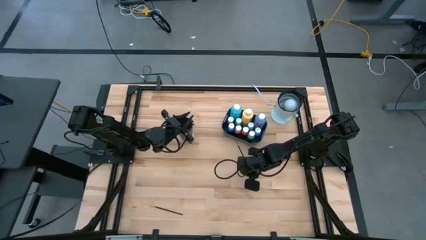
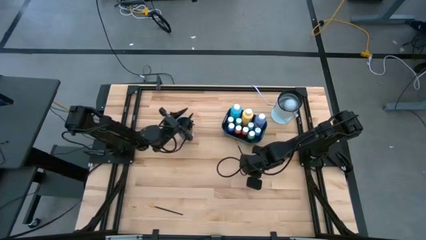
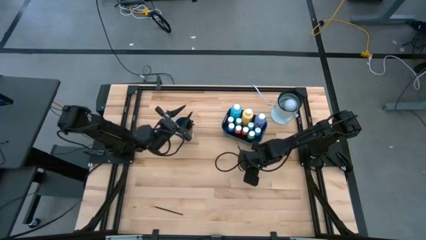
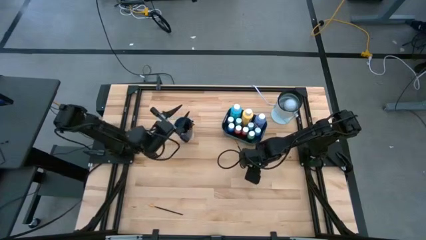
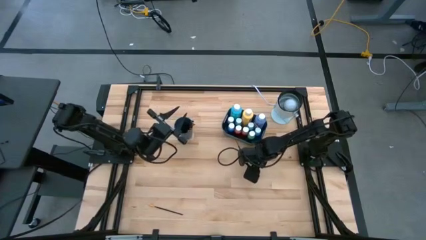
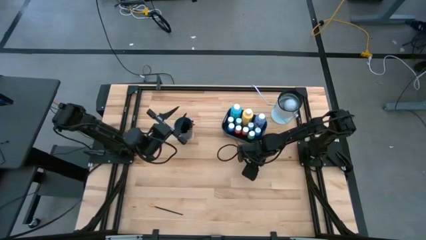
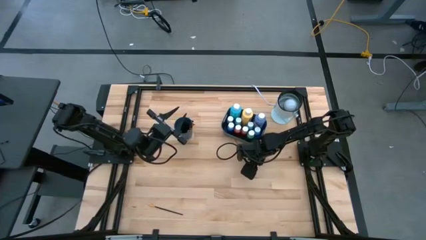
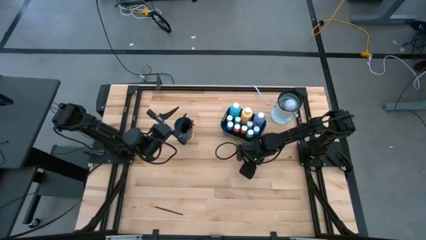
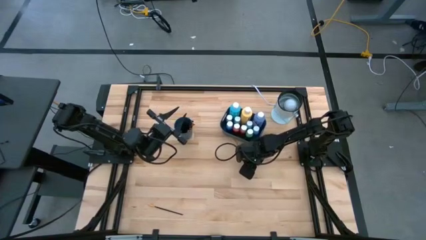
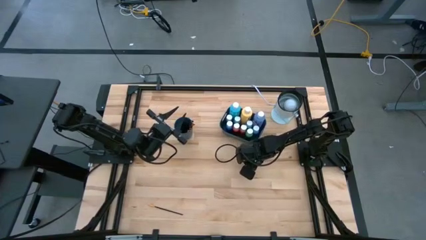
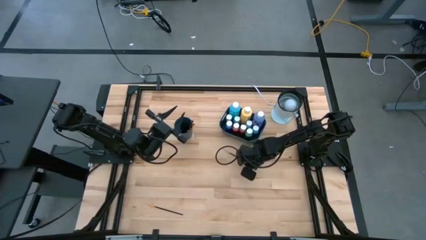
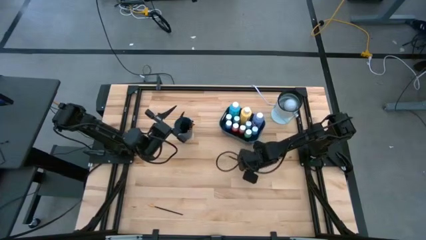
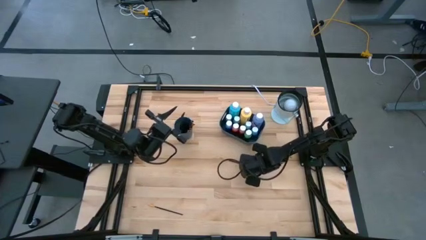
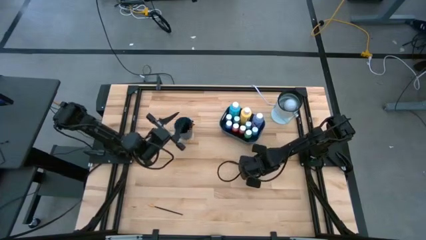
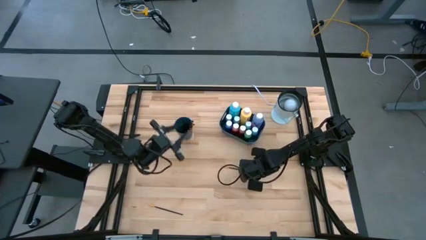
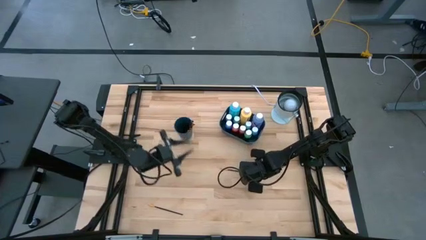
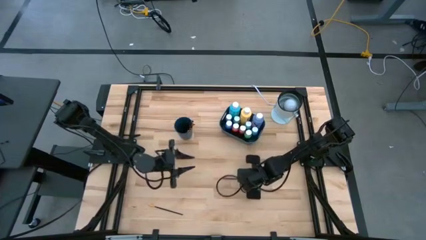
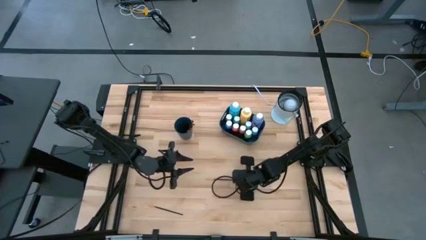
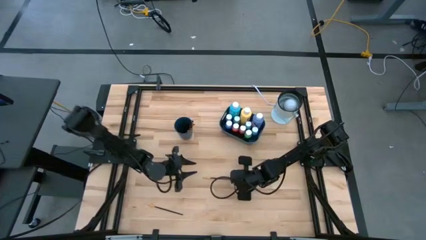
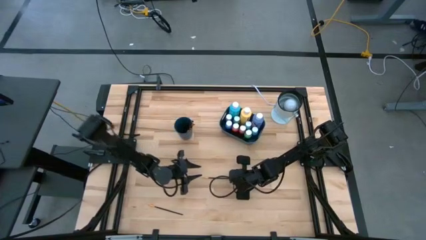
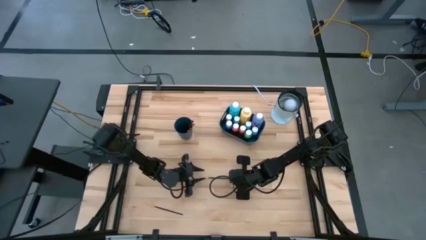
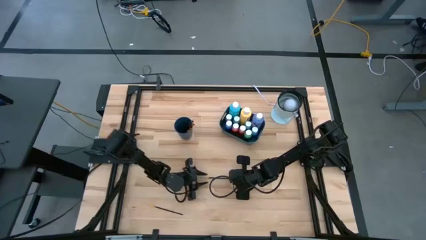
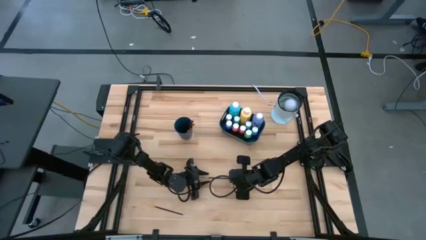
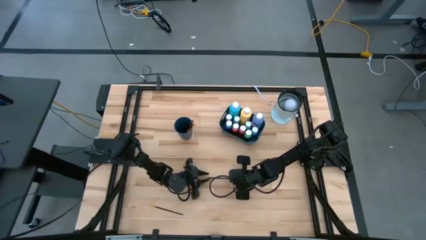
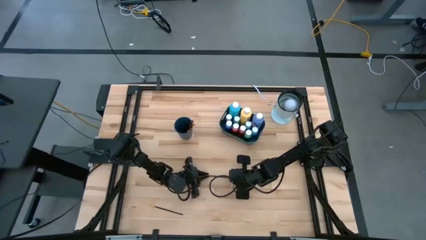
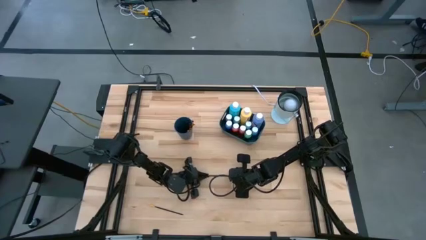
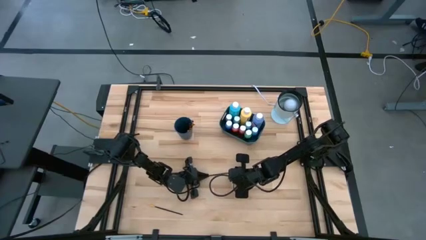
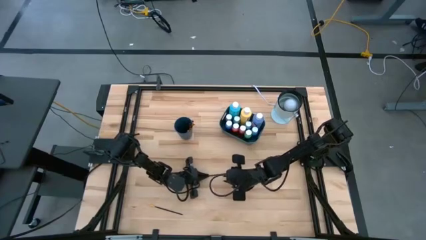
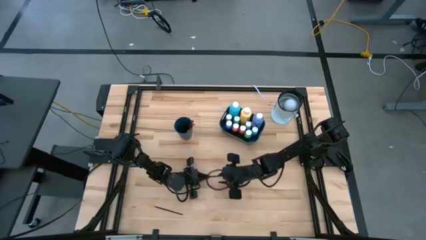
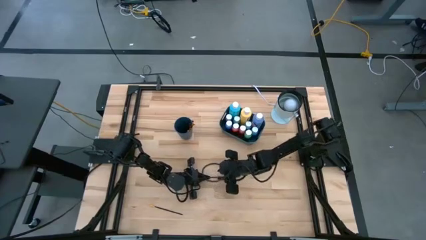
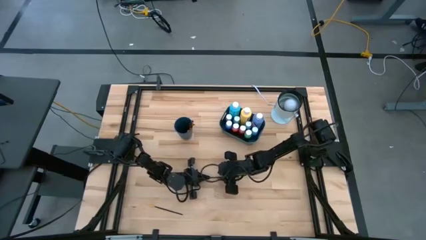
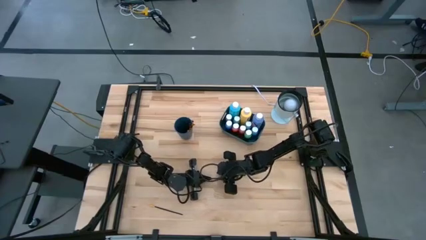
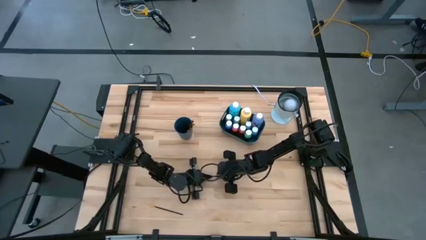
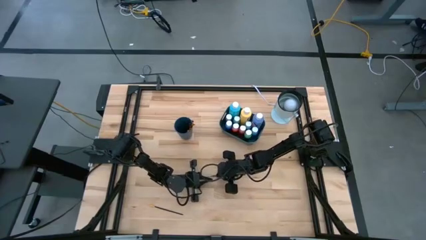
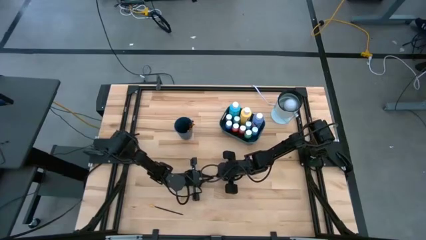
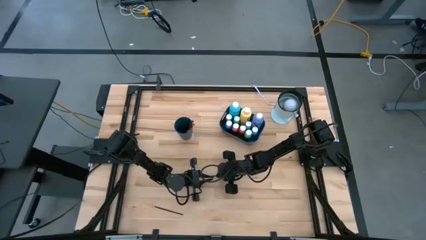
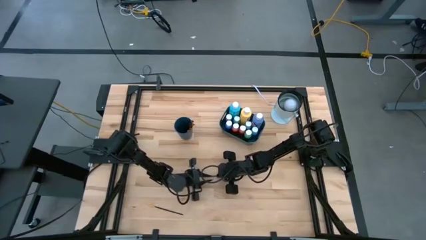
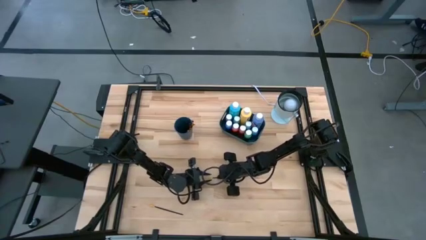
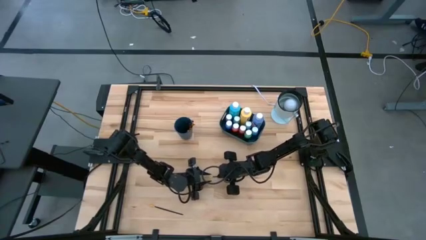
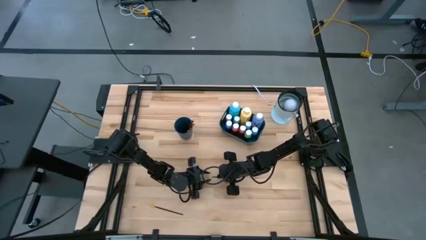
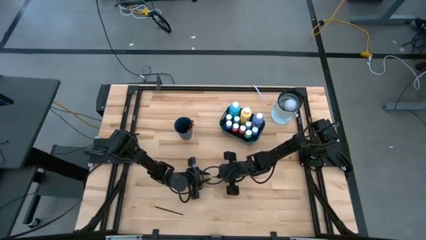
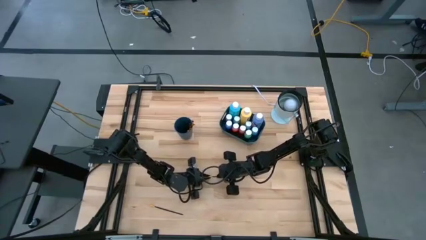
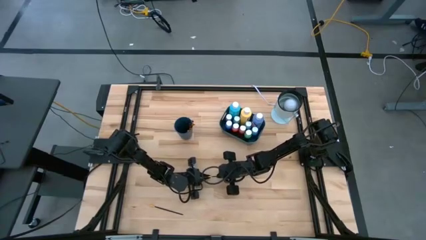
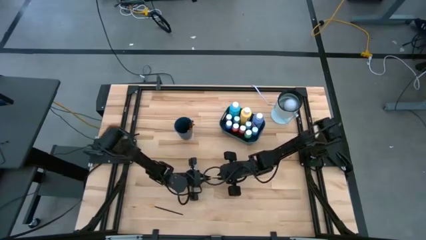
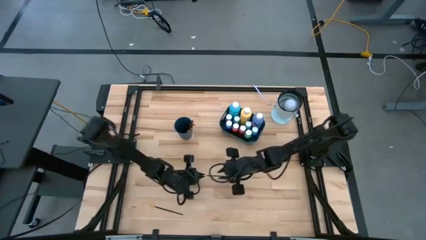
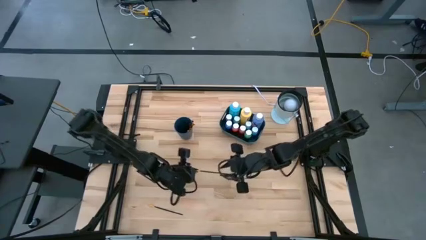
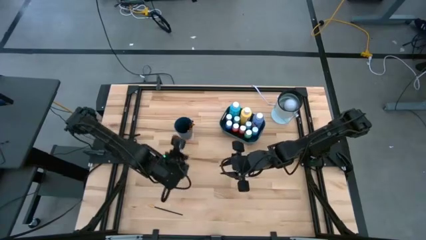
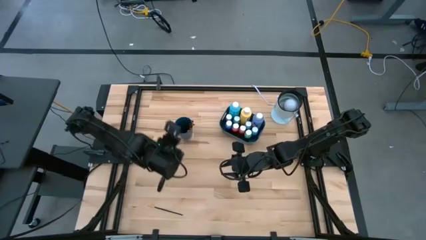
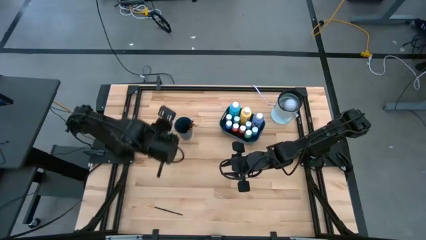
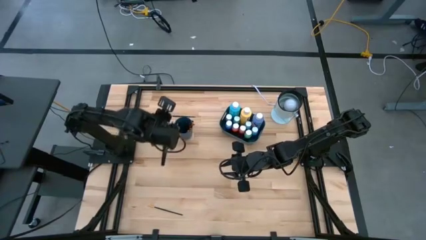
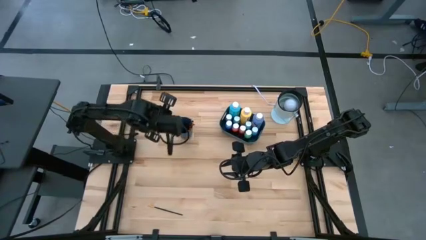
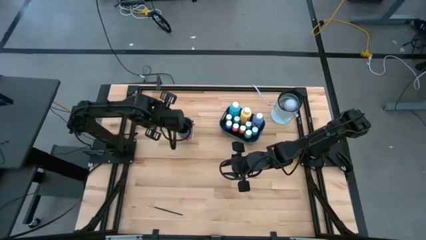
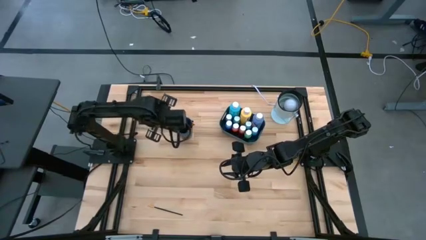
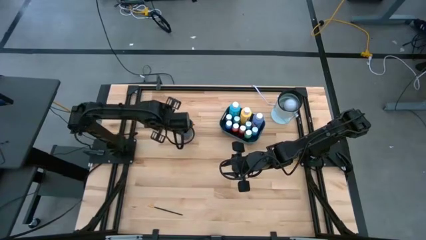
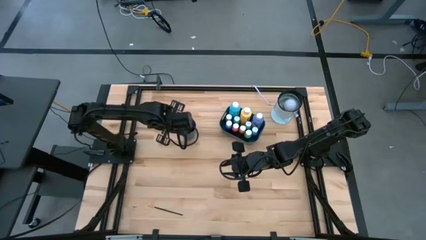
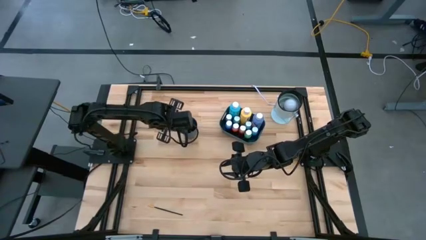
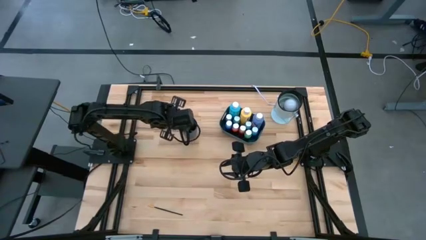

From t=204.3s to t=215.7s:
Task: Pick & Place Paint Supplies
Put the gold paintbrush into the blue cup

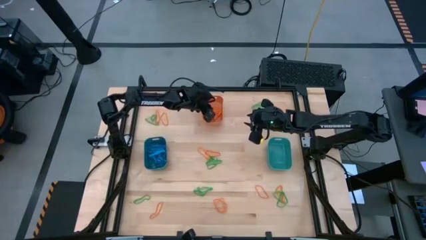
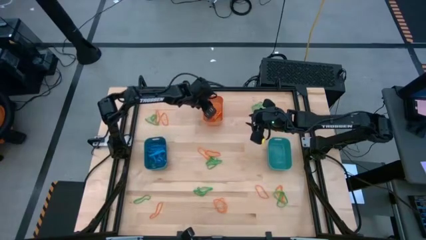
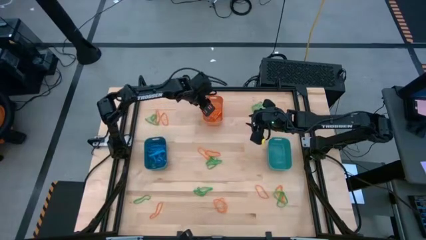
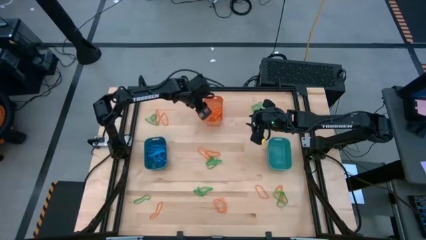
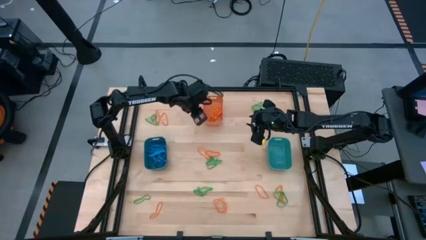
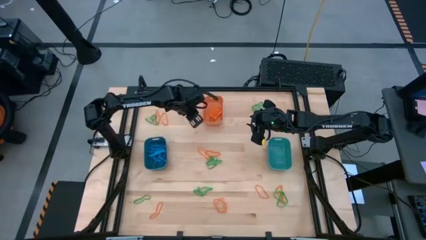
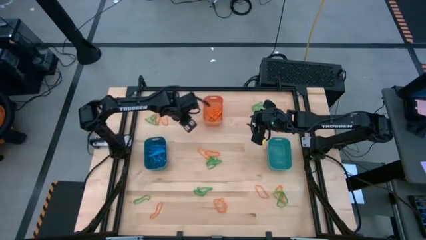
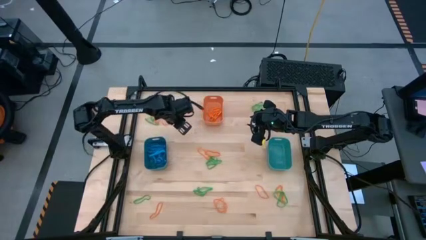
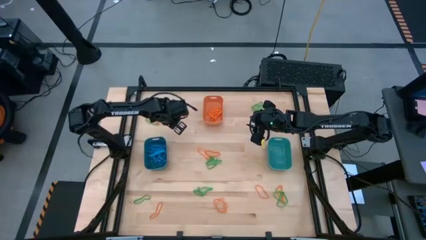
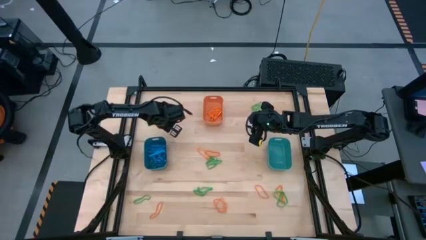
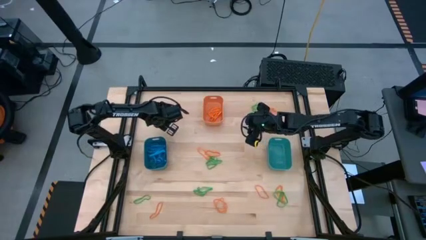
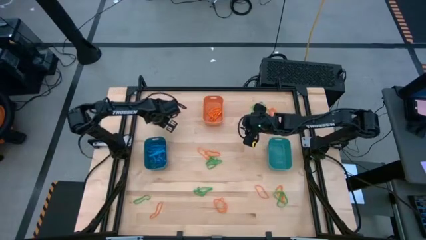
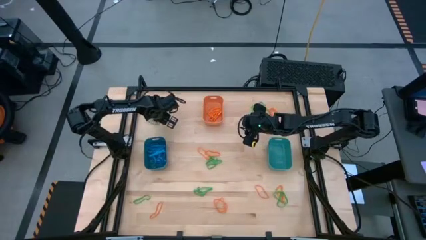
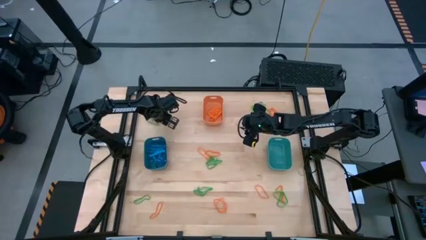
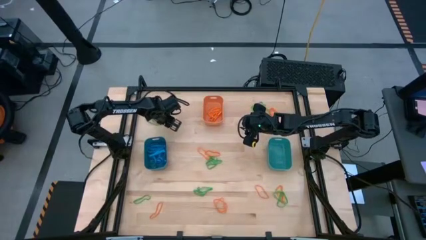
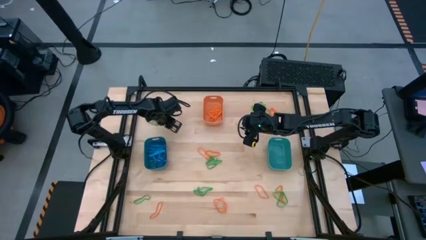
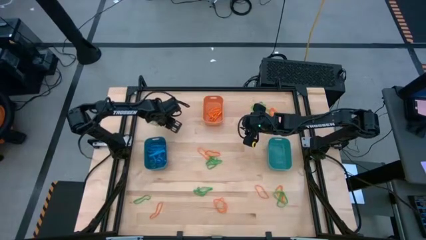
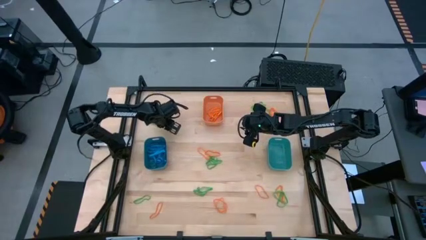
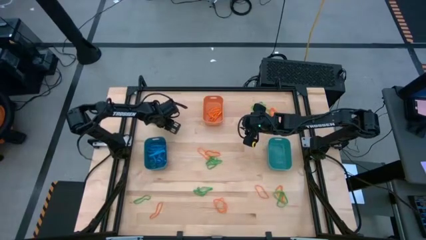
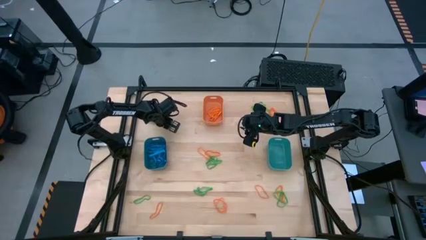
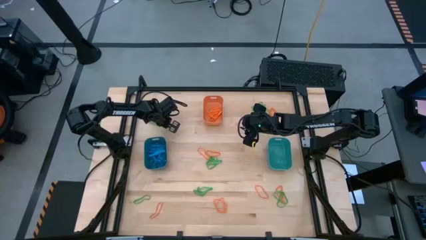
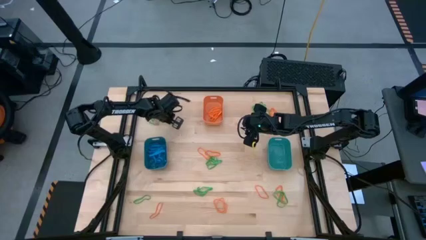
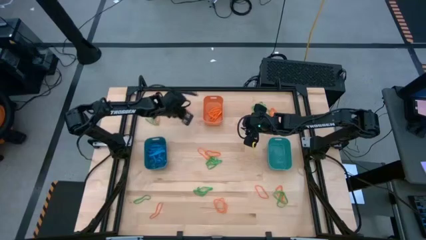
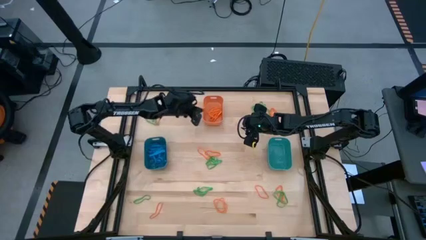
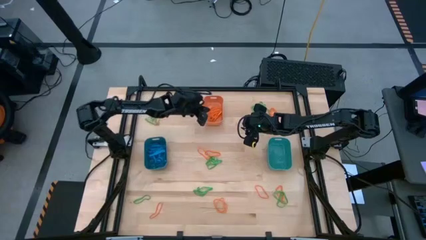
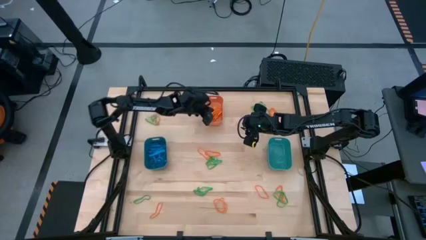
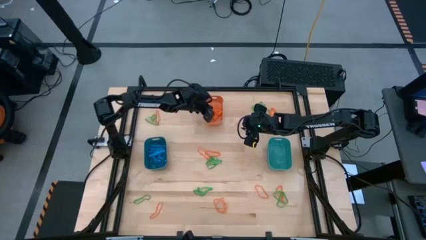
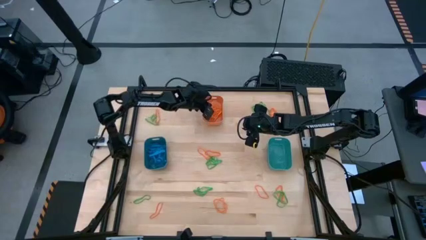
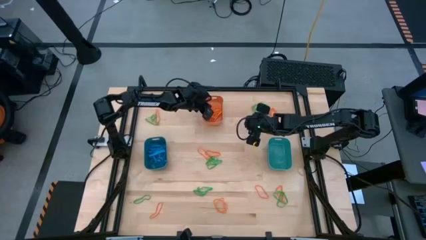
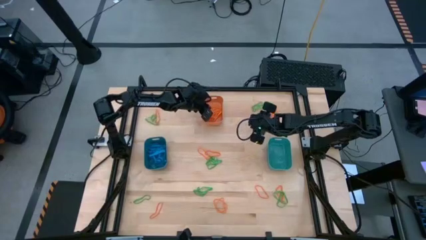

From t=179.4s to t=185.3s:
Task: Sort rubber bands into baskets
Put the orange rubber band into the orange bin
